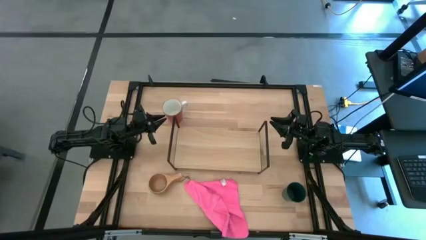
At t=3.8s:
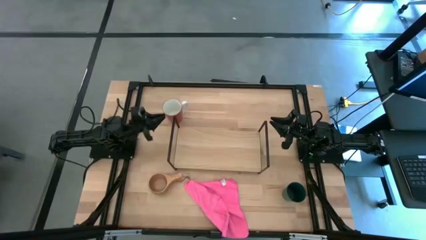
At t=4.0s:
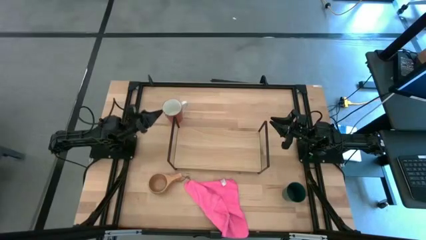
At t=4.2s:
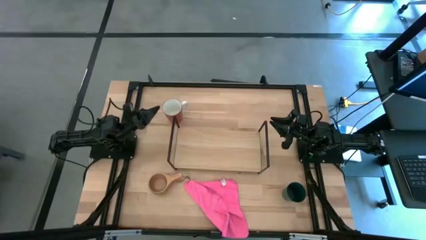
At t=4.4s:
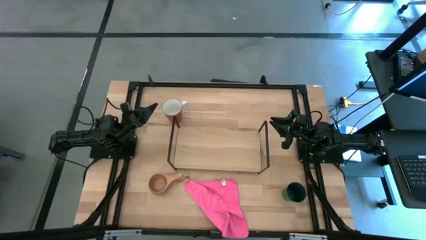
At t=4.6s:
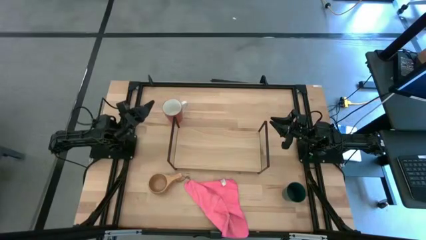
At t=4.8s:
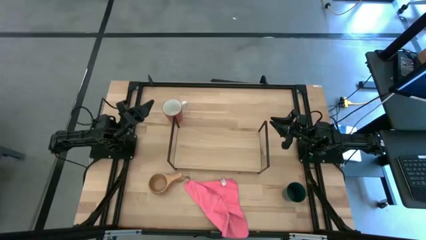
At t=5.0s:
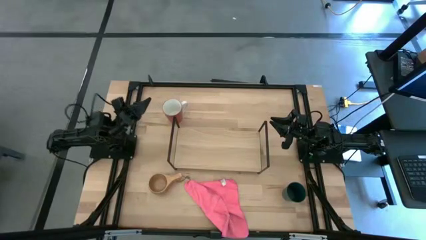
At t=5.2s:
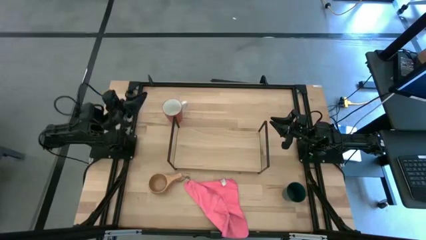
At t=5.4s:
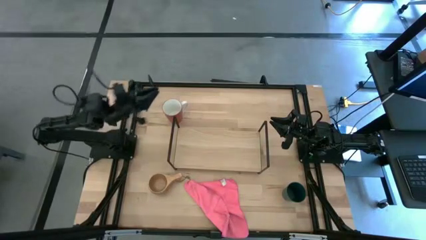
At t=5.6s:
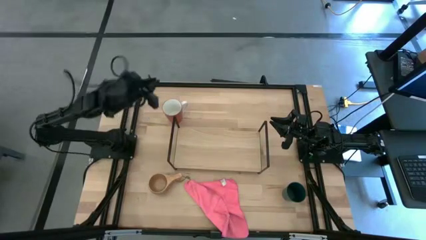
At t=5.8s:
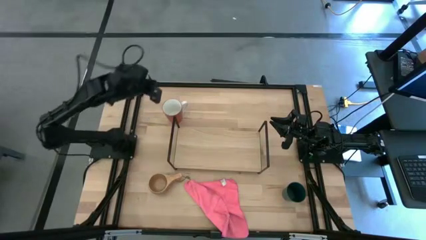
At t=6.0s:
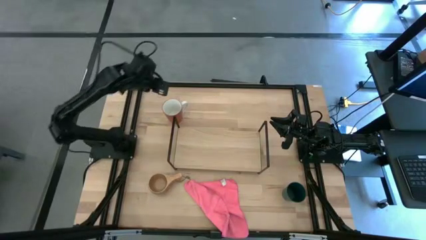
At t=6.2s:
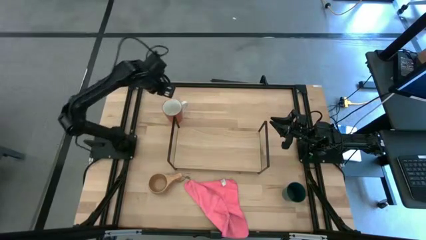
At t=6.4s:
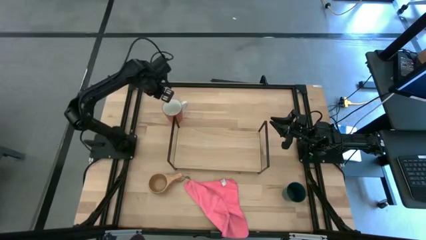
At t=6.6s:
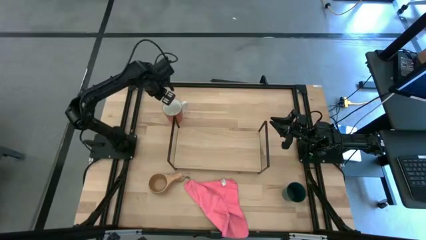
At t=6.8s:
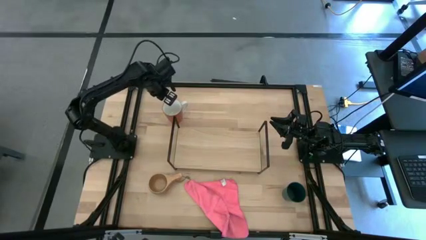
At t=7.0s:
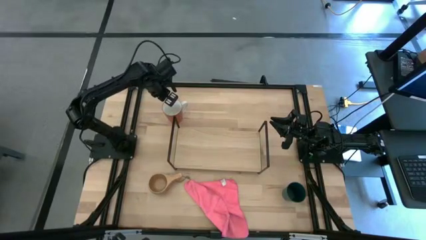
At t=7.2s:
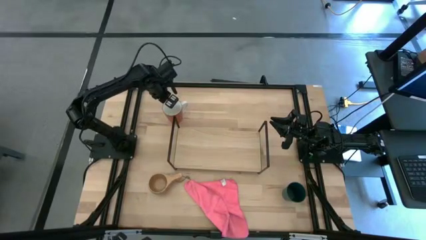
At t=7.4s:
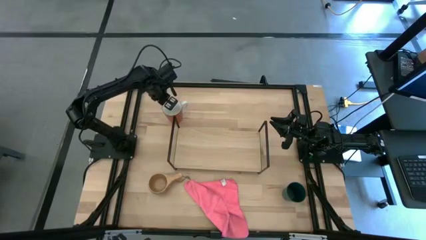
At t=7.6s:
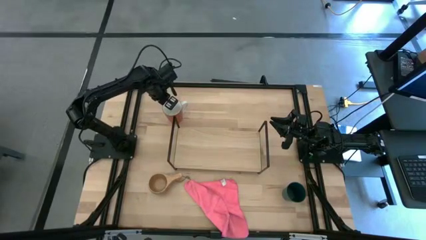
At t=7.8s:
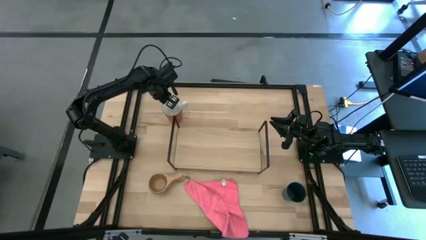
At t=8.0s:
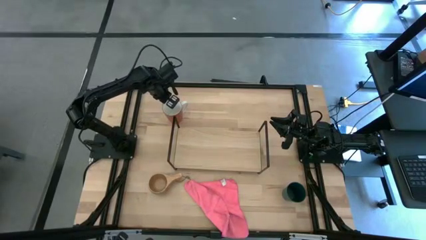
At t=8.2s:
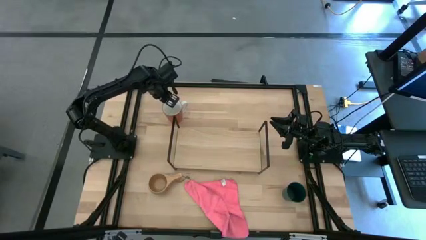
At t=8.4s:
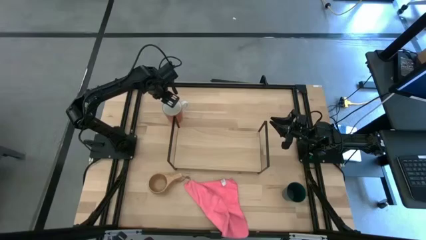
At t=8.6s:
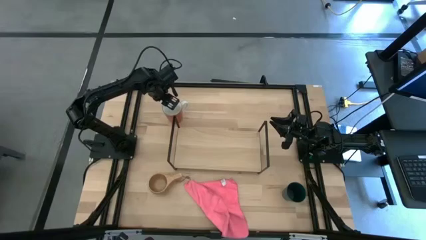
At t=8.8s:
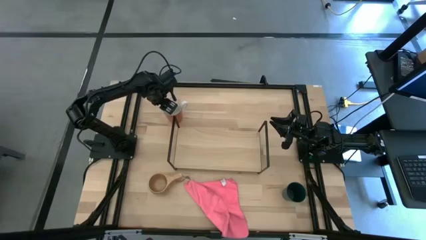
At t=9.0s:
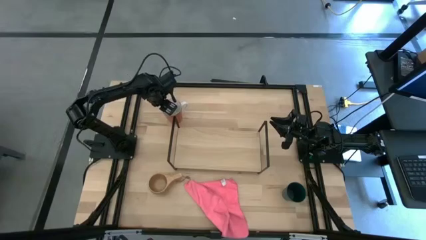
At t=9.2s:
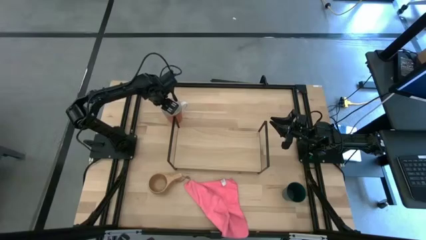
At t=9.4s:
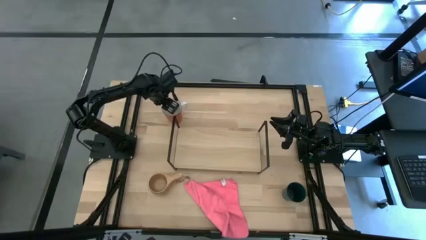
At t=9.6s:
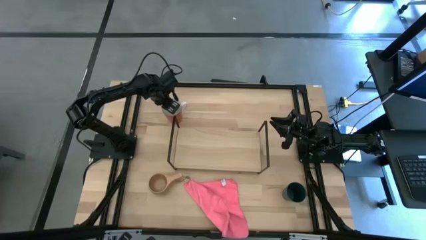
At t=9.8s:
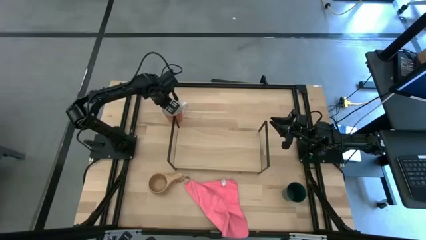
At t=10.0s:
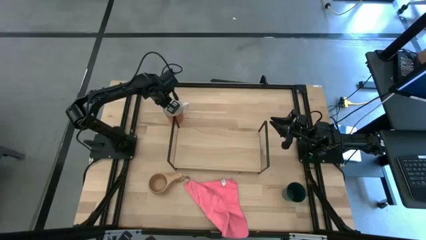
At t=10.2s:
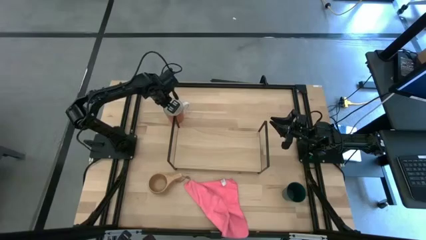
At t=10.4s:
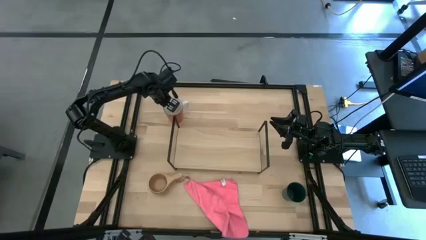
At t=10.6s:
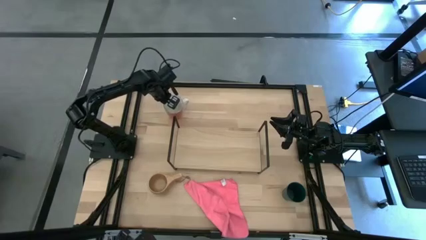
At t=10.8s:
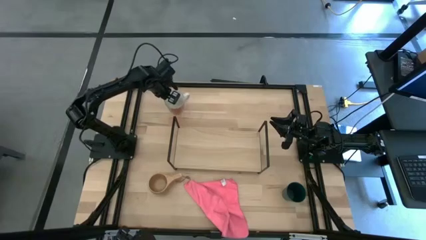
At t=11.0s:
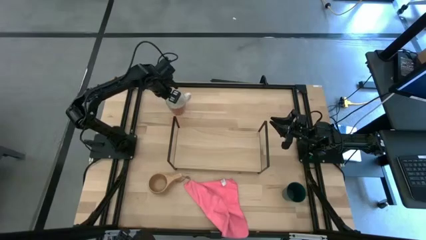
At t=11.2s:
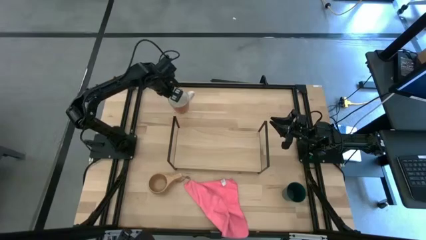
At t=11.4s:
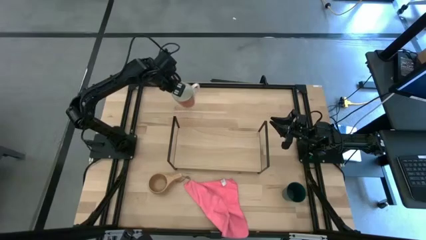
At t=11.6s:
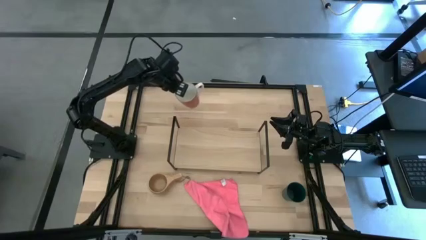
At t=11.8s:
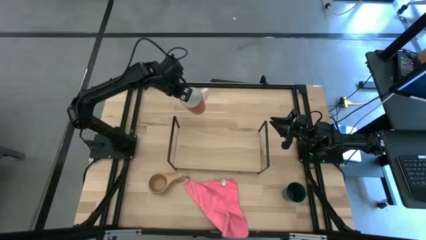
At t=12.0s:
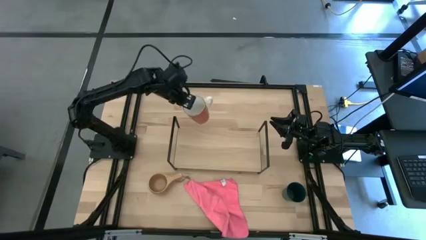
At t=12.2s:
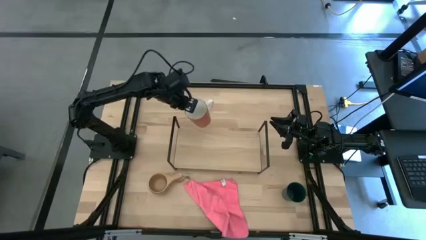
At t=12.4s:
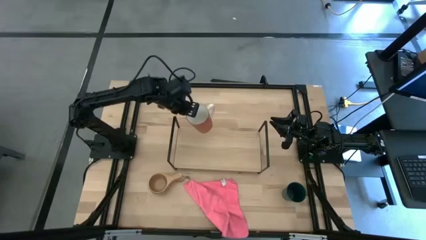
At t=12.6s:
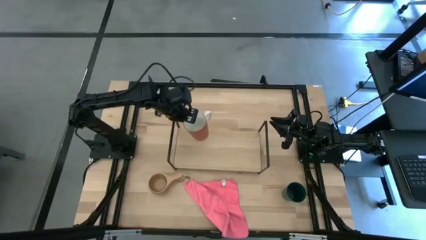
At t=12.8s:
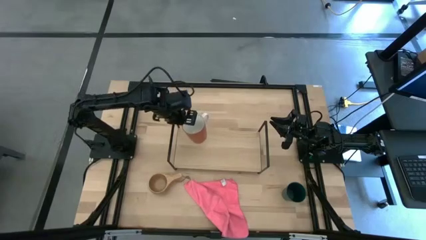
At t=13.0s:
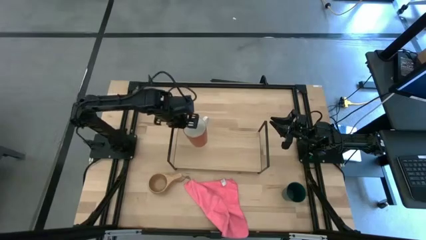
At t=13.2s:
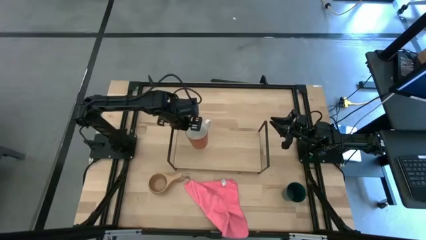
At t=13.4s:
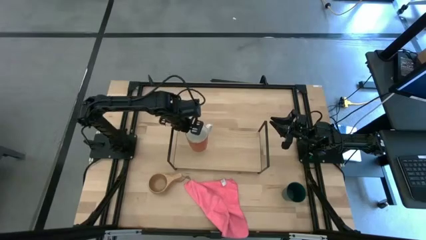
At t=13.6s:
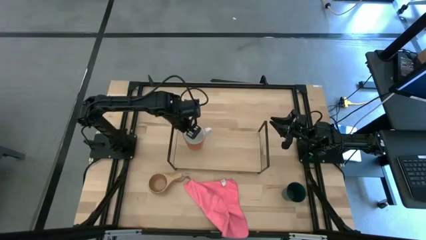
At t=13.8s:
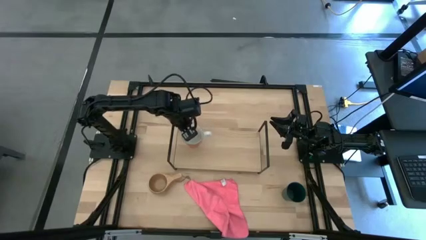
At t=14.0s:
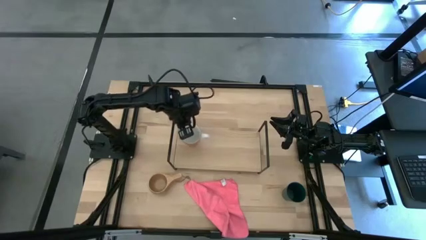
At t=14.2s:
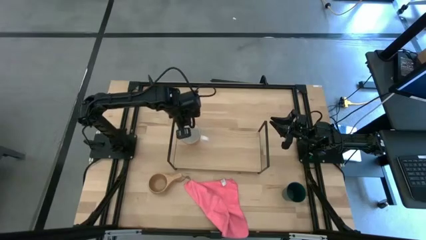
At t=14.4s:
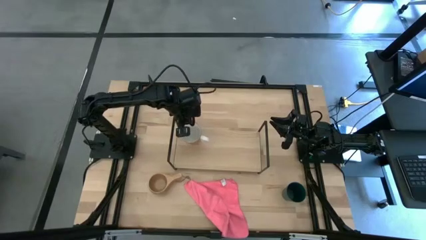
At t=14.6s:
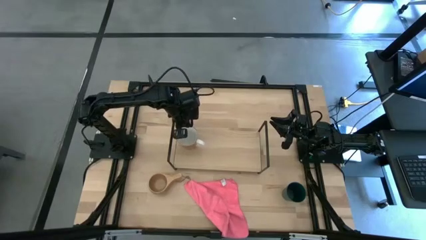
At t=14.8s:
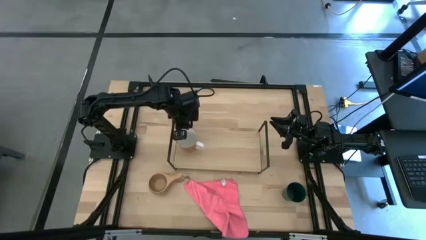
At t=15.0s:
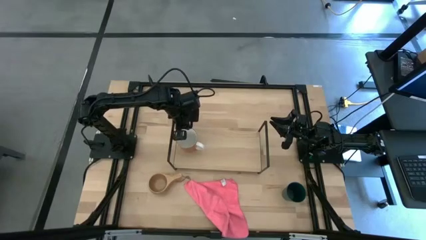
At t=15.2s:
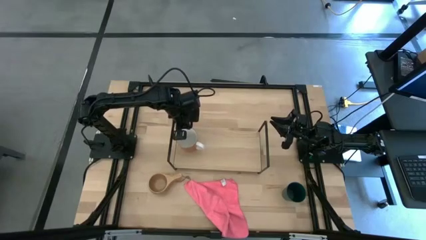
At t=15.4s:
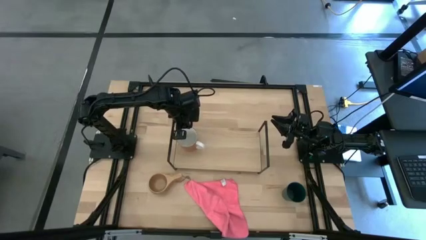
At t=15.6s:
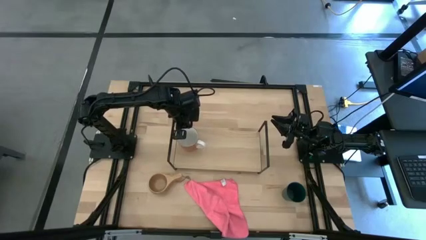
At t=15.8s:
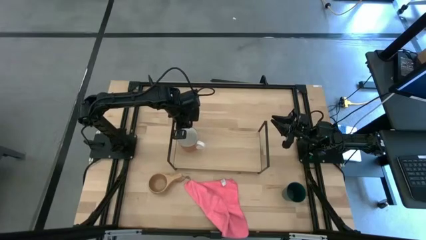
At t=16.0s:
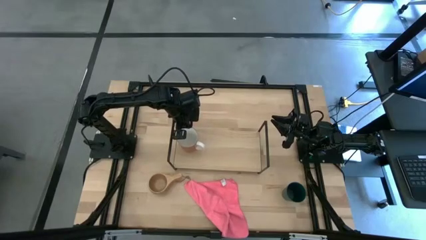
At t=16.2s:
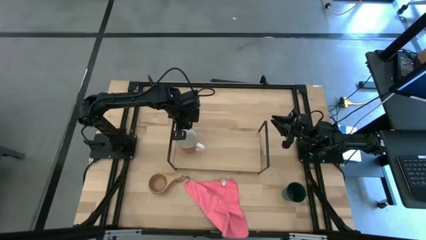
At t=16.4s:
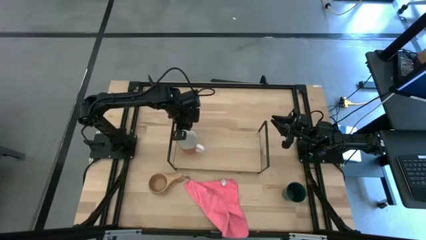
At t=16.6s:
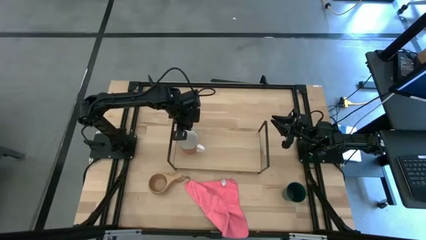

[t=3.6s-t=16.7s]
Task: Stack small to large cups/mugs on shelf
Put orange mug on the shelf
